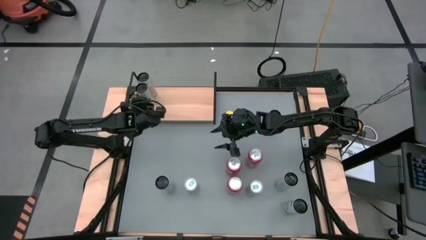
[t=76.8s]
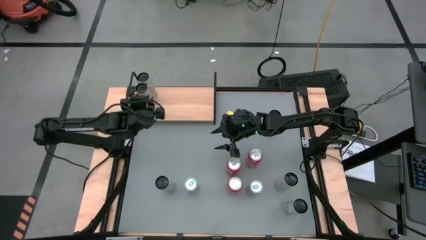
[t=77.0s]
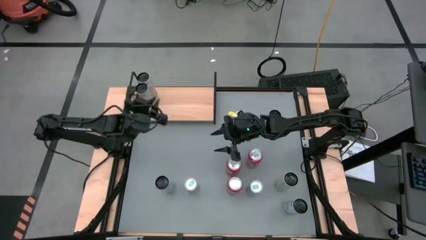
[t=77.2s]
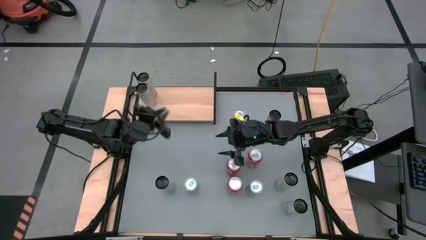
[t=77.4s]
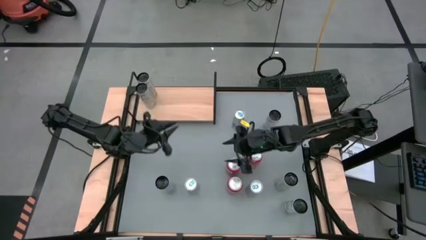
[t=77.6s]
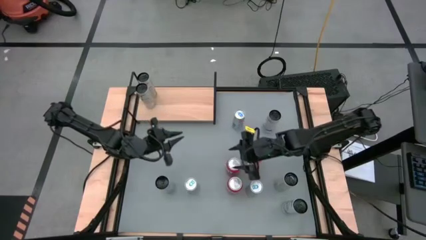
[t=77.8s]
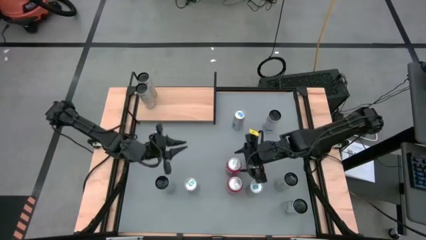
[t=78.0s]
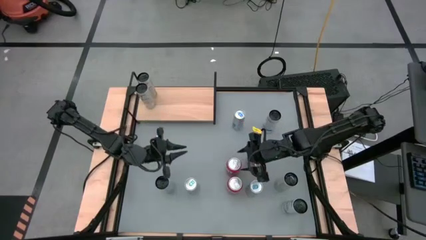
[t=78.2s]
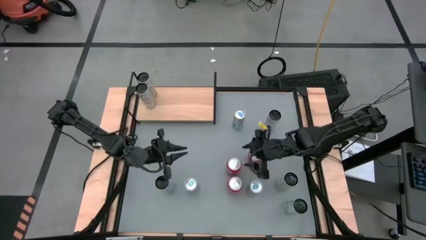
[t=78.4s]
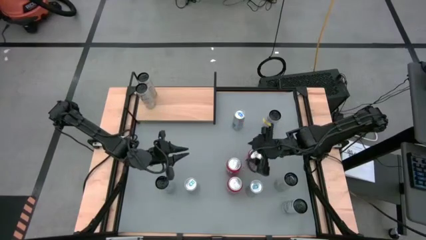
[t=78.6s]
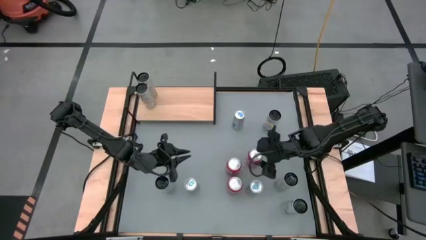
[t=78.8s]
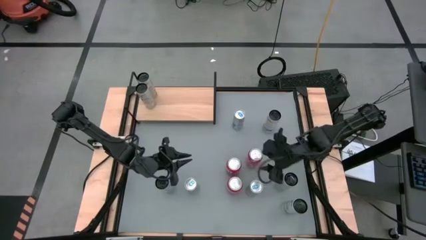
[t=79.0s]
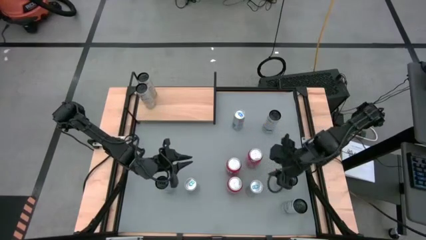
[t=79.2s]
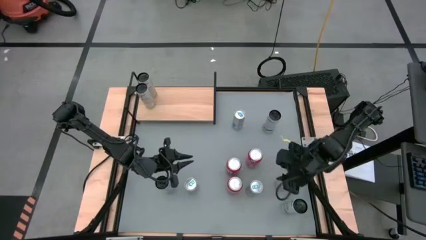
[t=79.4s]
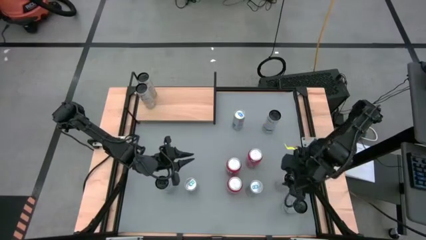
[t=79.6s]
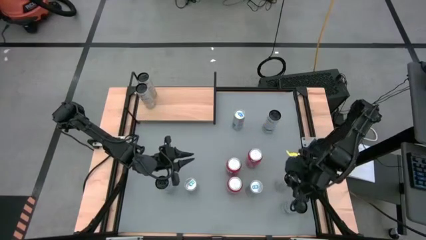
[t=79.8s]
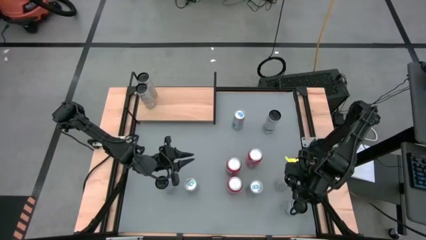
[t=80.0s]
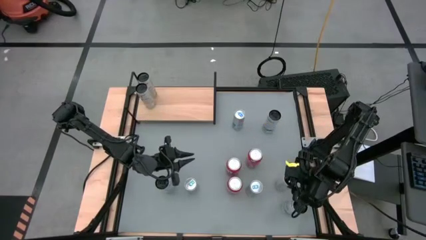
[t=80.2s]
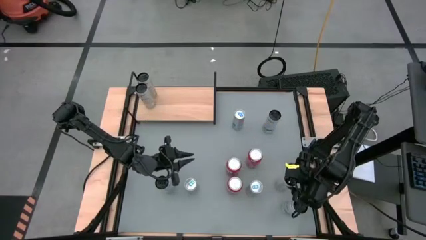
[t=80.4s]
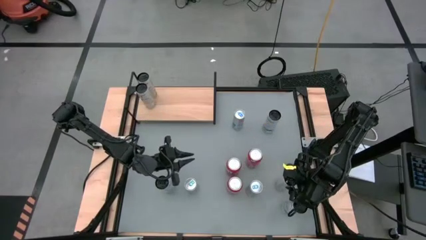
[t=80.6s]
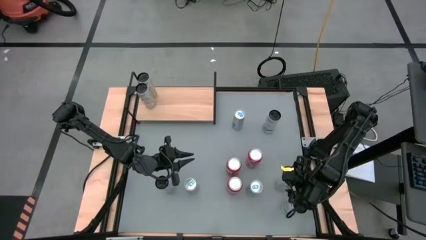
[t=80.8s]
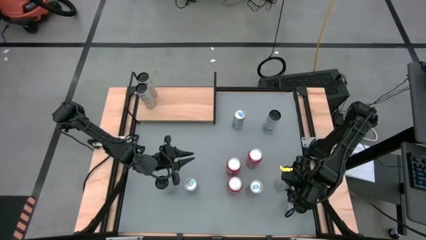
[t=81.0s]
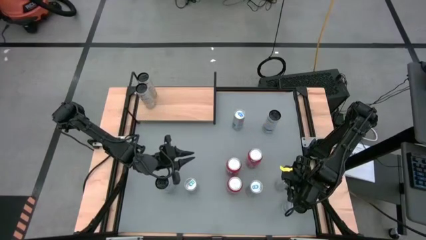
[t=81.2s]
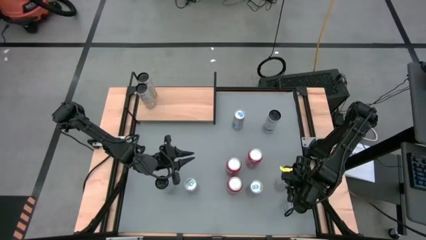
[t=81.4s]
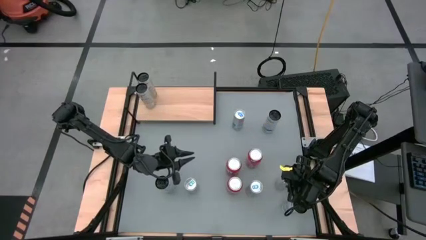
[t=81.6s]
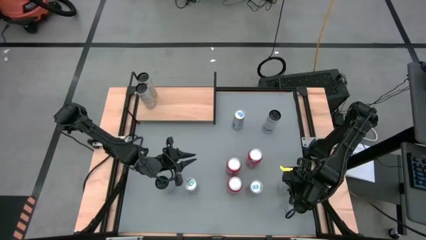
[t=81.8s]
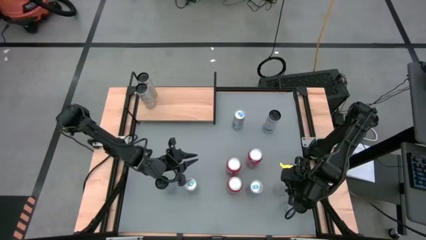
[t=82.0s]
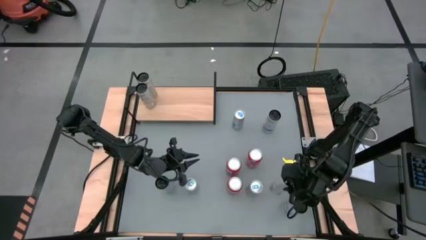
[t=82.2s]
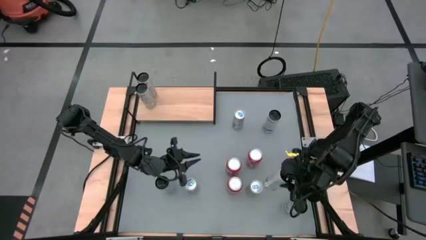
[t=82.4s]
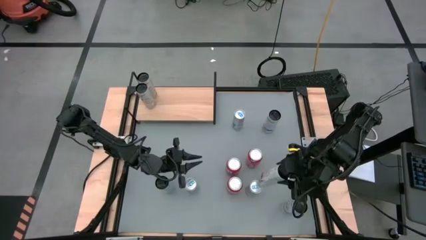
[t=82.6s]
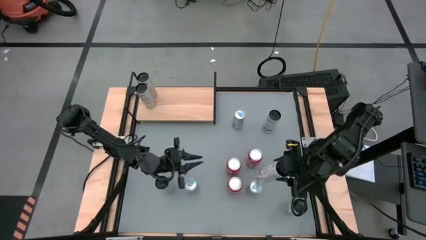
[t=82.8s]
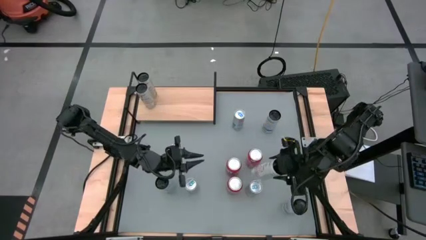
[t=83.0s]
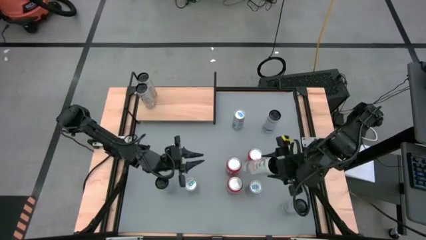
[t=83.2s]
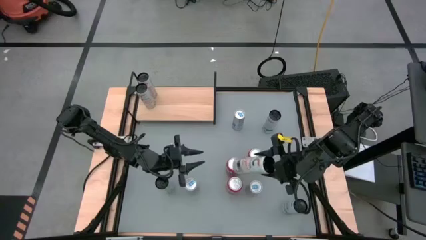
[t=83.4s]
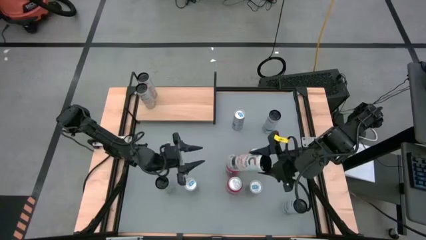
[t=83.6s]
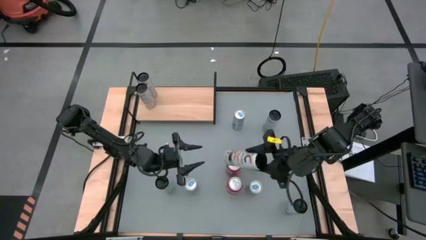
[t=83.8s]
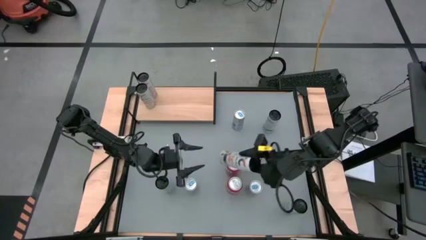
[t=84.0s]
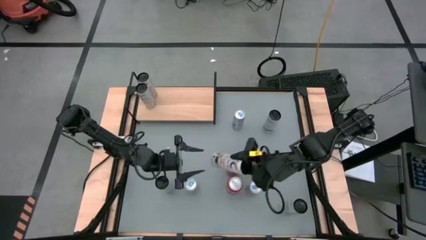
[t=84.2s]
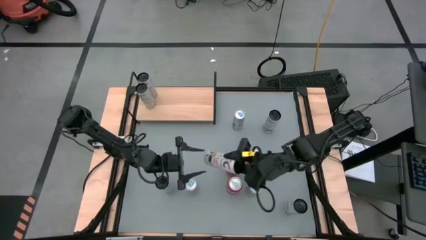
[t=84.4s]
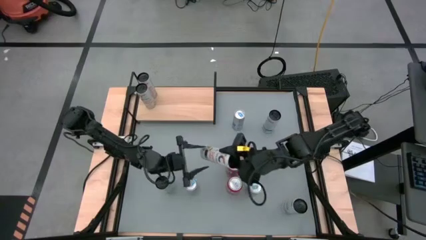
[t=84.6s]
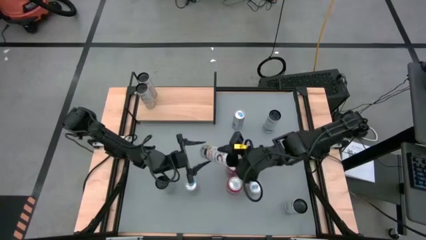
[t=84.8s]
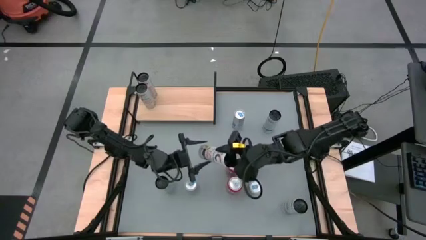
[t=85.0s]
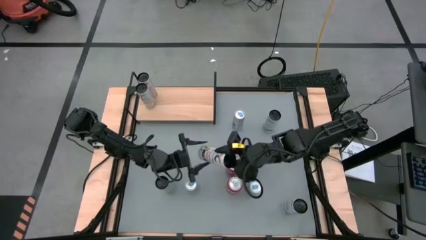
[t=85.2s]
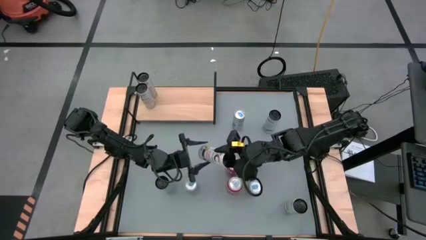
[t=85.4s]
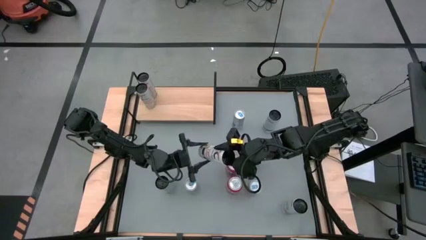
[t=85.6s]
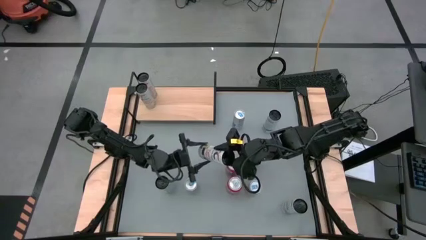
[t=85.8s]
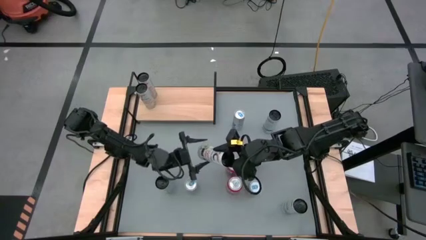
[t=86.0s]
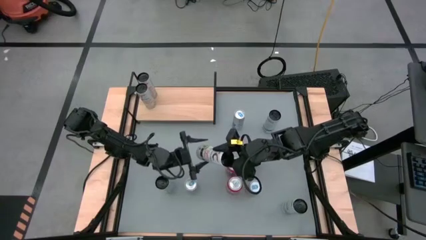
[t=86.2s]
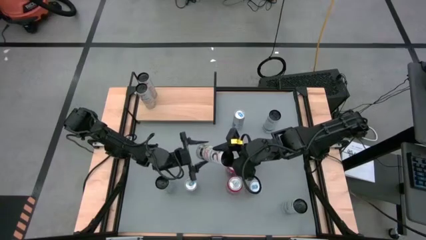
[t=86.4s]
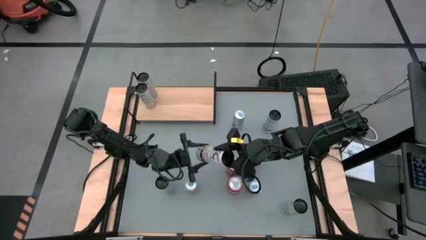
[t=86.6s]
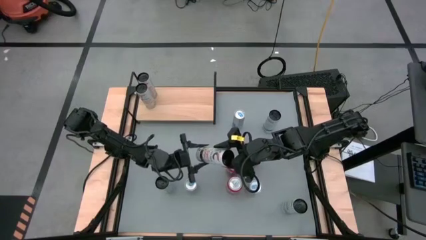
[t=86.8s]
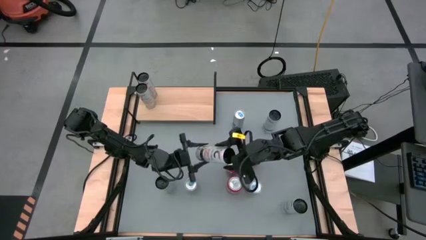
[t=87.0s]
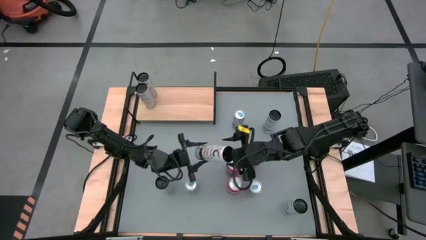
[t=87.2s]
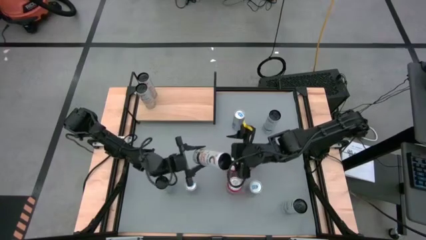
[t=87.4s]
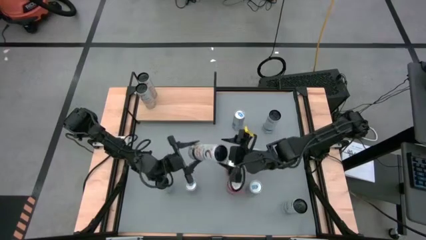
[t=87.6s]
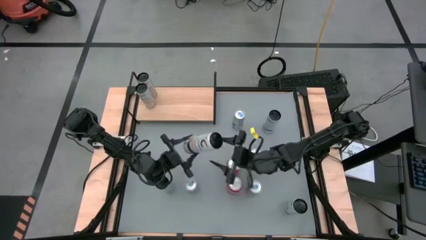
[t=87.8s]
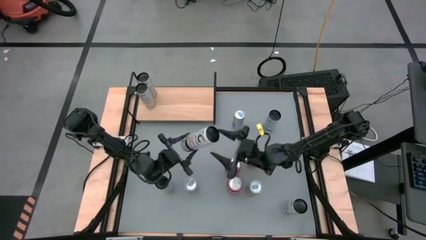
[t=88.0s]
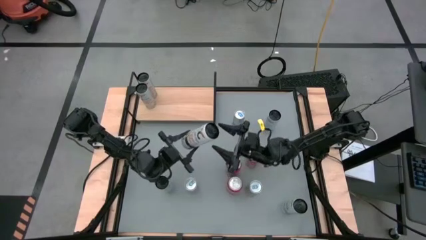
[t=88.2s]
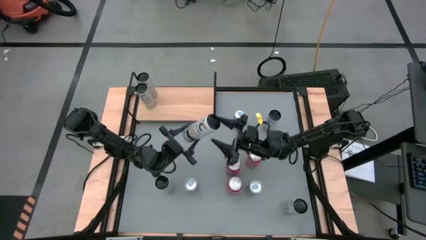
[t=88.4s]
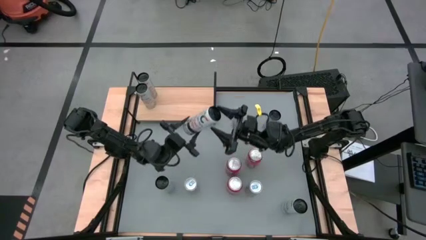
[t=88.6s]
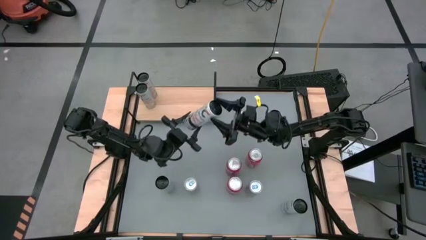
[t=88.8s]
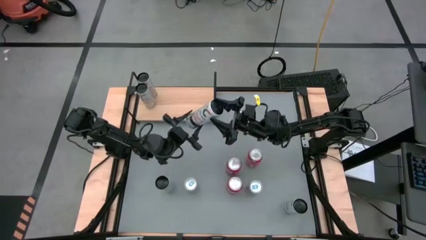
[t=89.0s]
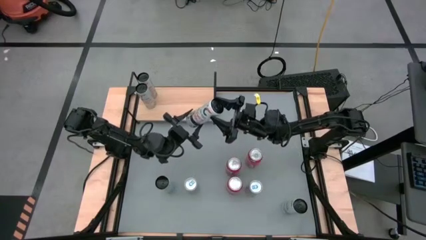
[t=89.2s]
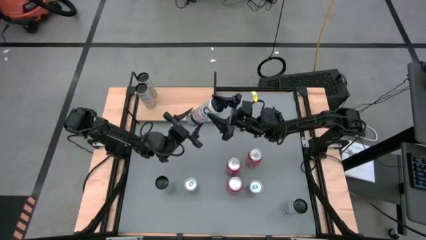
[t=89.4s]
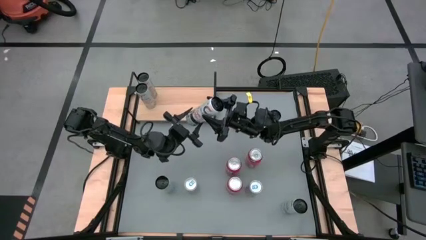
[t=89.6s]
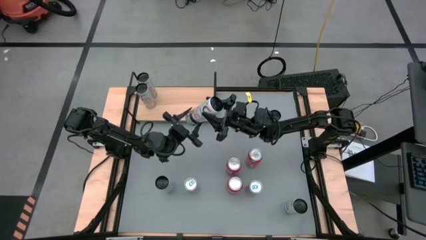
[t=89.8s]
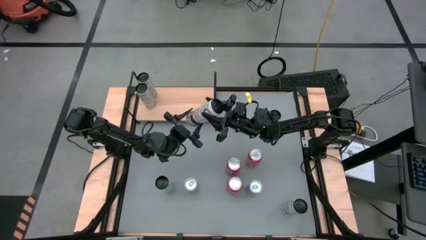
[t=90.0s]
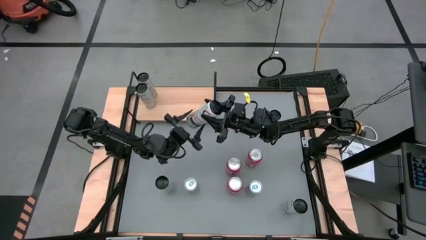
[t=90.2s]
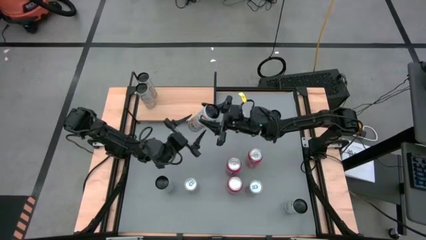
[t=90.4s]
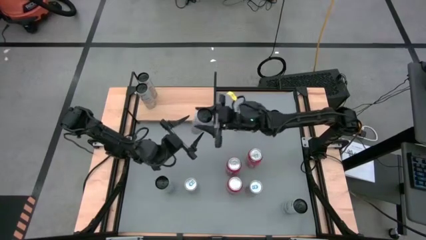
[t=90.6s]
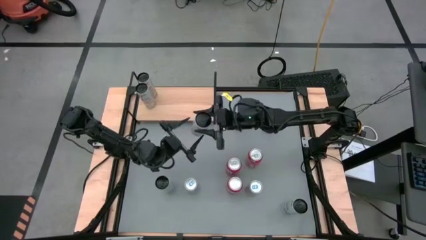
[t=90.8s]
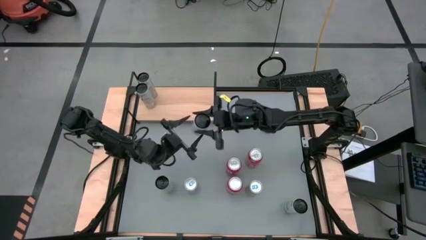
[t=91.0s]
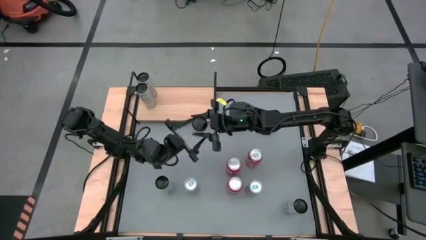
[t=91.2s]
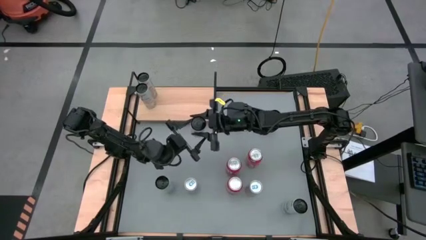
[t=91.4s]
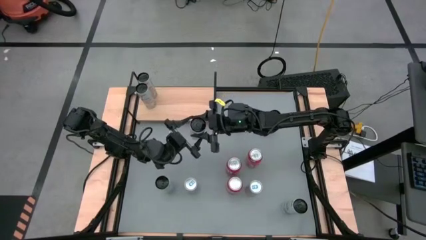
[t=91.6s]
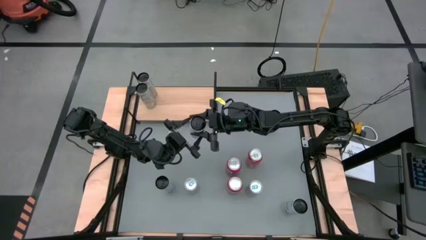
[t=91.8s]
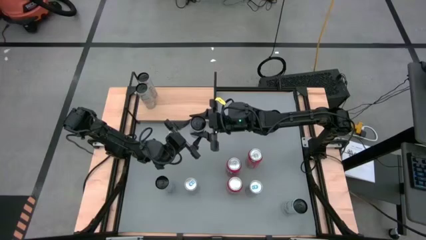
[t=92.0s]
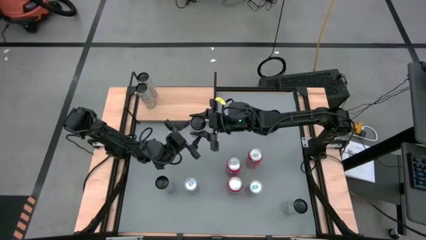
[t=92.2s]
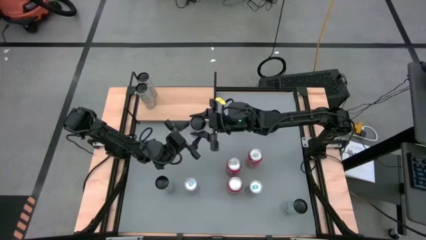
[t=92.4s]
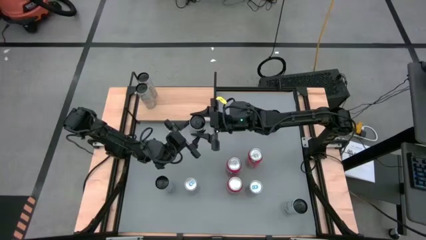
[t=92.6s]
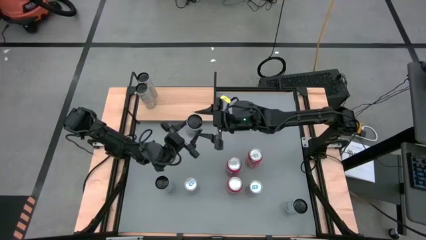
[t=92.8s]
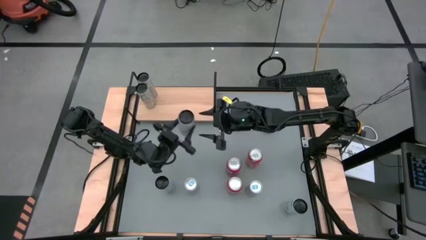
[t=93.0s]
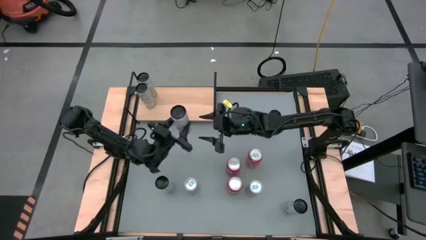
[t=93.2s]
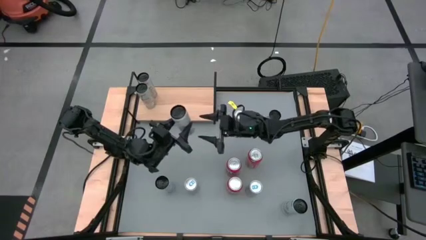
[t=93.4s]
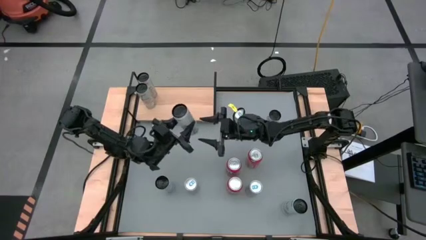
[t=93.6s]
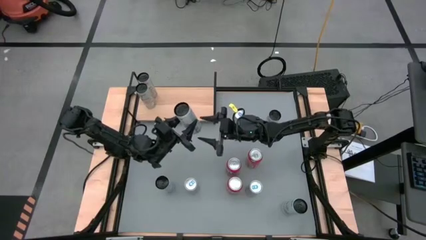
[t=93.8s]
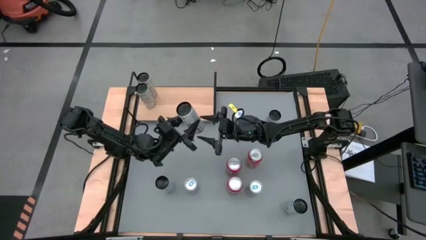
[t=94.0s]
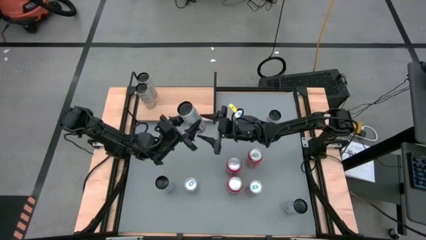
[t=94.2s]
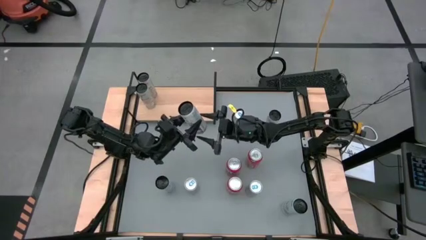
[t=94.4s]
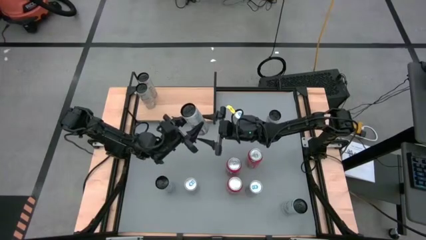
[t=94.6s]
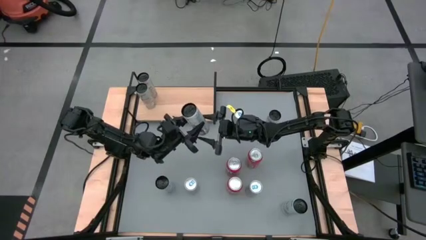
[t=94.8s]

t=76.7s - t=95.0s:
Task: Place canned beverage on shelf
Put the white-yellow soda can on the shelf aligned with the other white-yellow soda can
